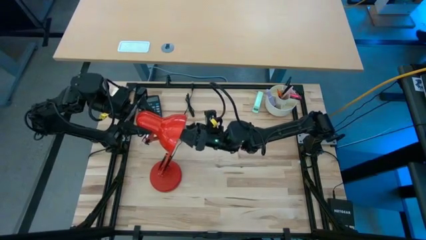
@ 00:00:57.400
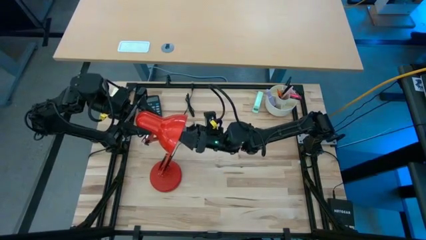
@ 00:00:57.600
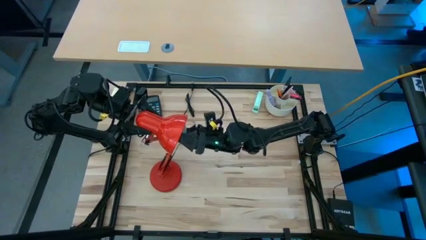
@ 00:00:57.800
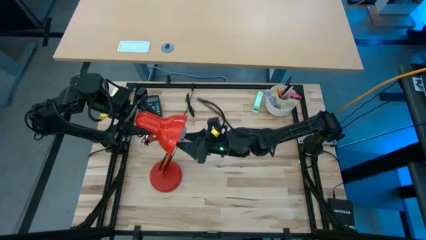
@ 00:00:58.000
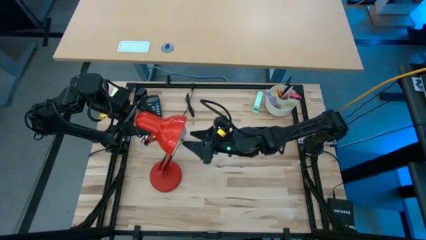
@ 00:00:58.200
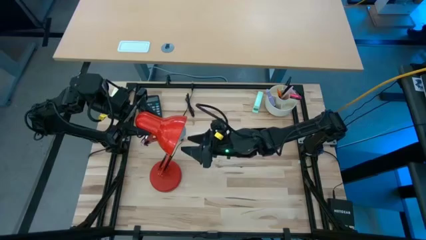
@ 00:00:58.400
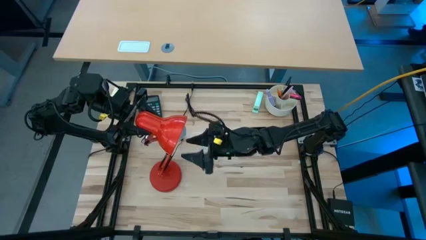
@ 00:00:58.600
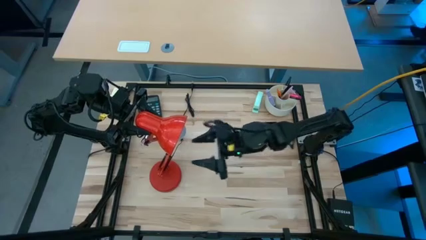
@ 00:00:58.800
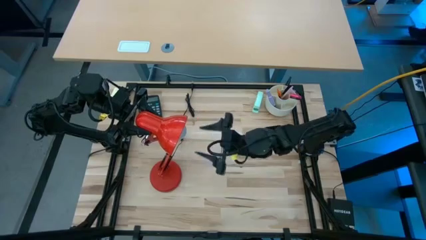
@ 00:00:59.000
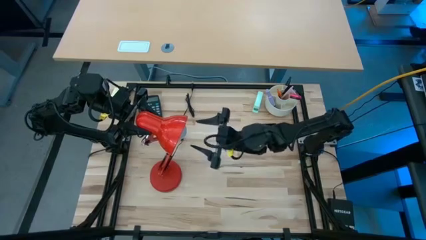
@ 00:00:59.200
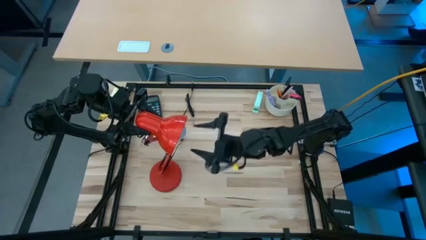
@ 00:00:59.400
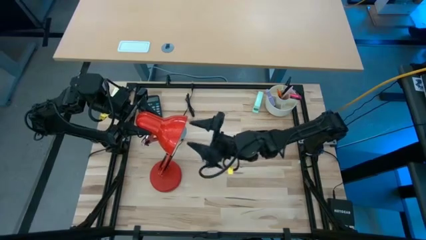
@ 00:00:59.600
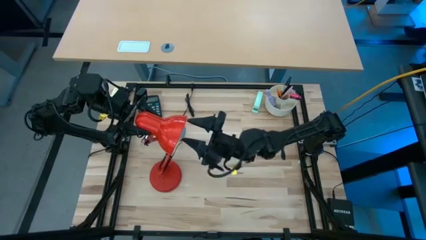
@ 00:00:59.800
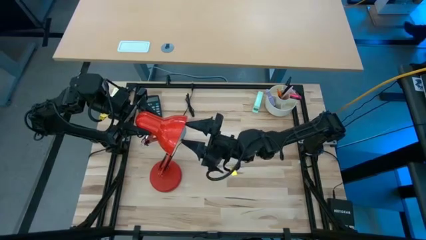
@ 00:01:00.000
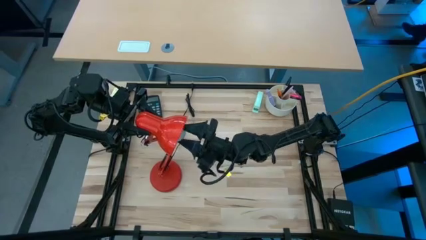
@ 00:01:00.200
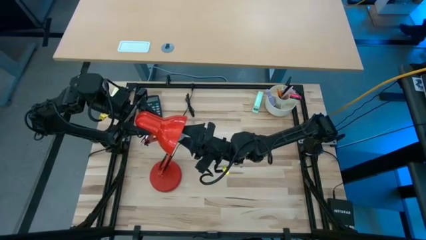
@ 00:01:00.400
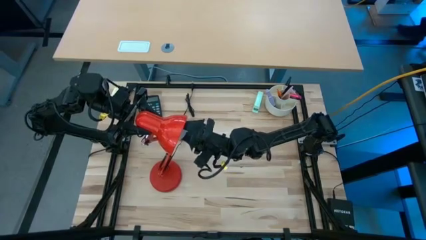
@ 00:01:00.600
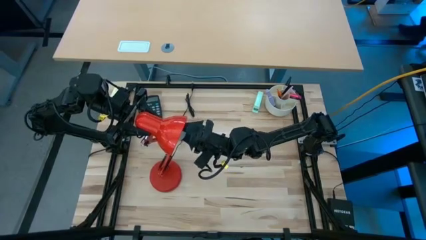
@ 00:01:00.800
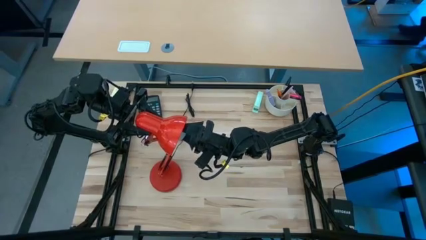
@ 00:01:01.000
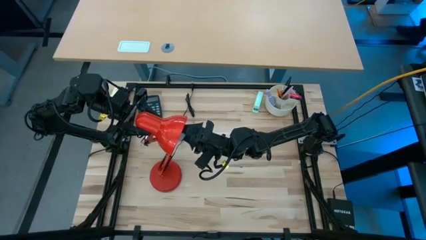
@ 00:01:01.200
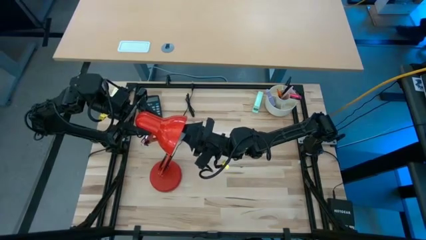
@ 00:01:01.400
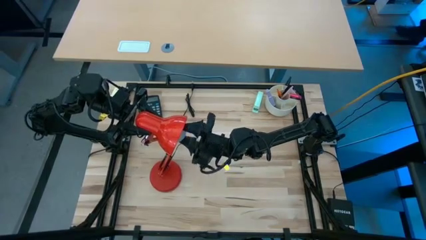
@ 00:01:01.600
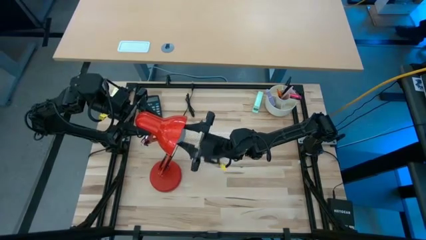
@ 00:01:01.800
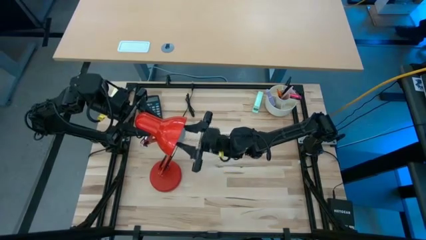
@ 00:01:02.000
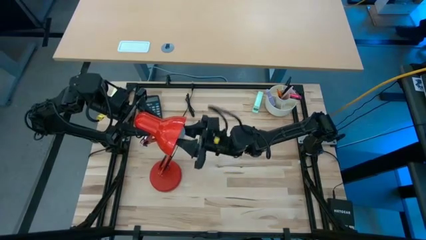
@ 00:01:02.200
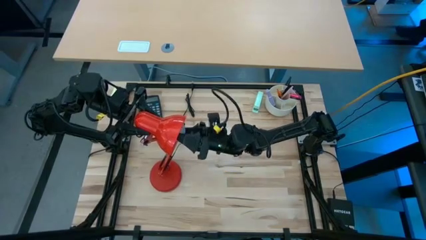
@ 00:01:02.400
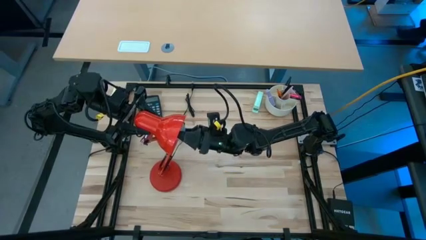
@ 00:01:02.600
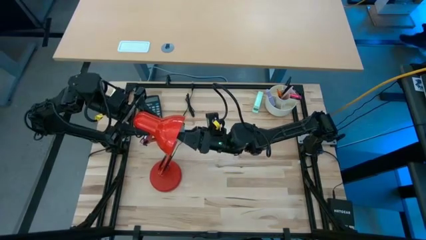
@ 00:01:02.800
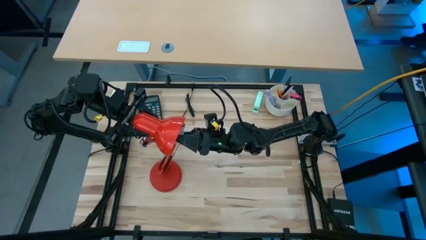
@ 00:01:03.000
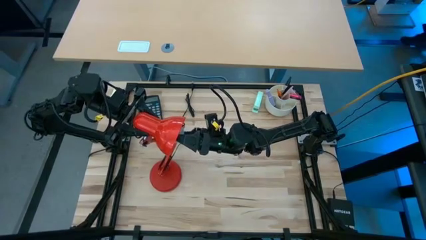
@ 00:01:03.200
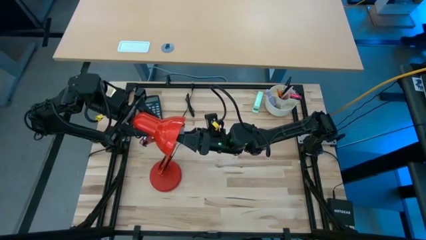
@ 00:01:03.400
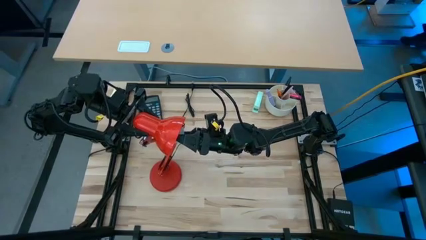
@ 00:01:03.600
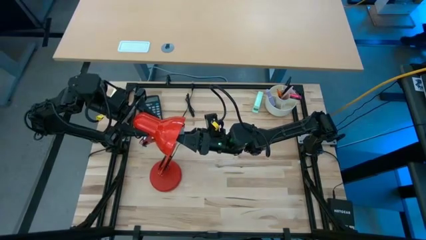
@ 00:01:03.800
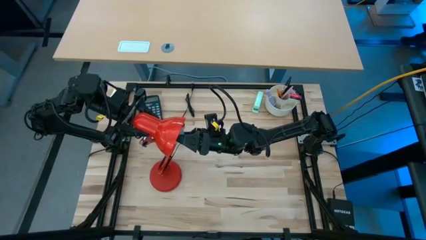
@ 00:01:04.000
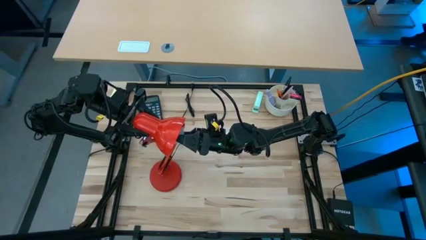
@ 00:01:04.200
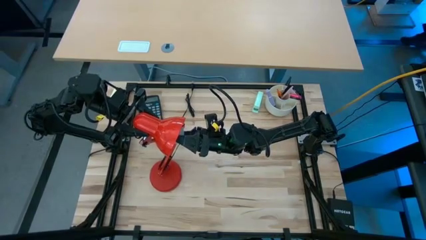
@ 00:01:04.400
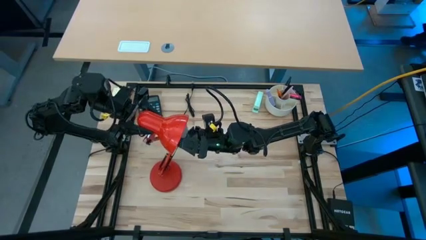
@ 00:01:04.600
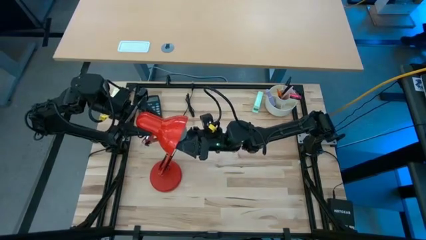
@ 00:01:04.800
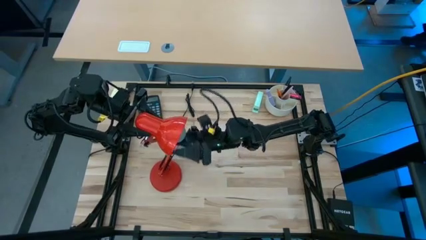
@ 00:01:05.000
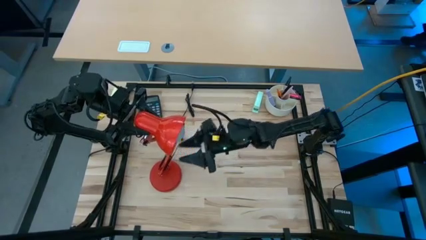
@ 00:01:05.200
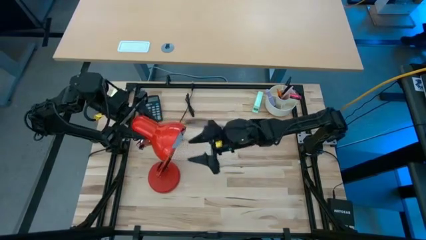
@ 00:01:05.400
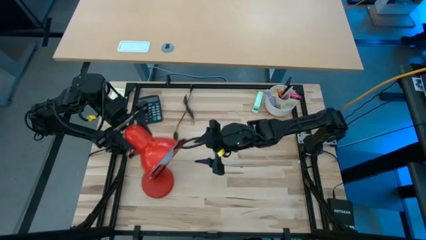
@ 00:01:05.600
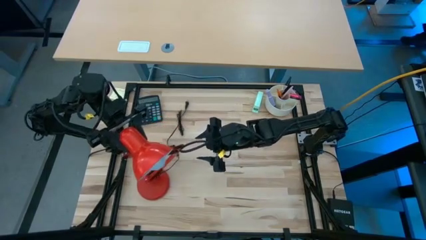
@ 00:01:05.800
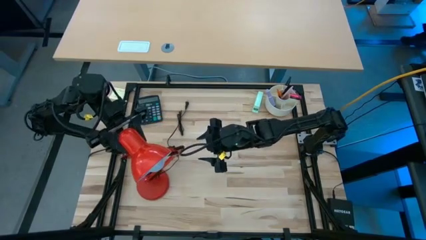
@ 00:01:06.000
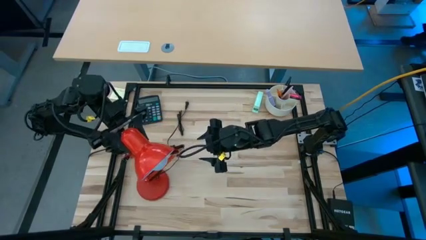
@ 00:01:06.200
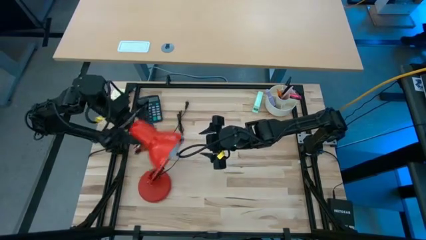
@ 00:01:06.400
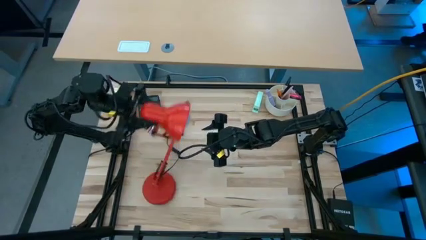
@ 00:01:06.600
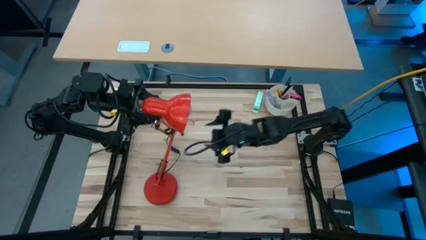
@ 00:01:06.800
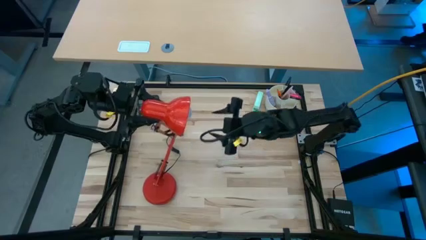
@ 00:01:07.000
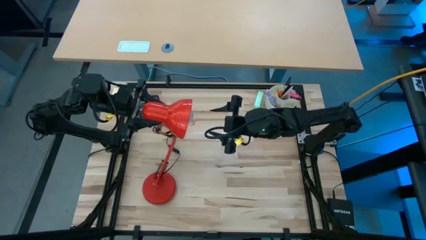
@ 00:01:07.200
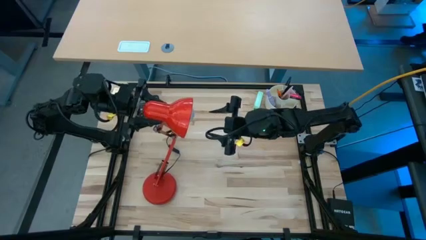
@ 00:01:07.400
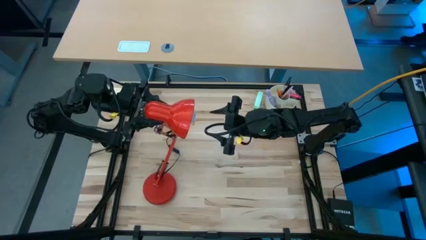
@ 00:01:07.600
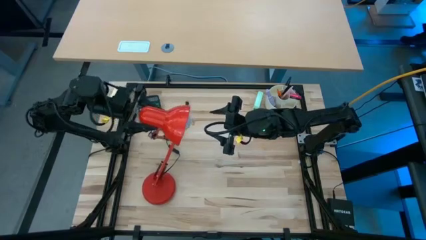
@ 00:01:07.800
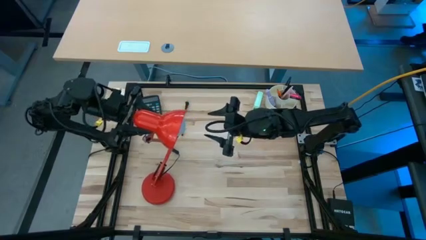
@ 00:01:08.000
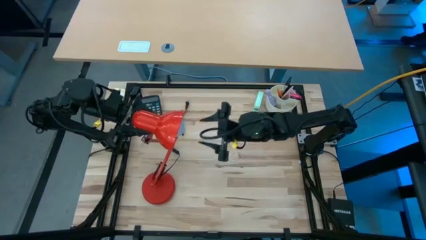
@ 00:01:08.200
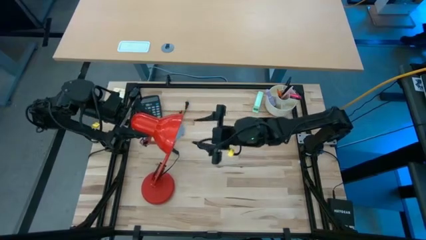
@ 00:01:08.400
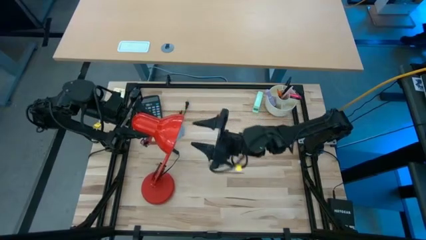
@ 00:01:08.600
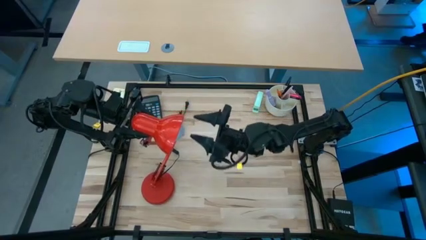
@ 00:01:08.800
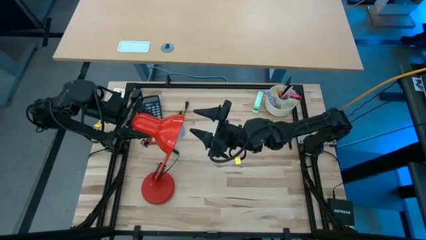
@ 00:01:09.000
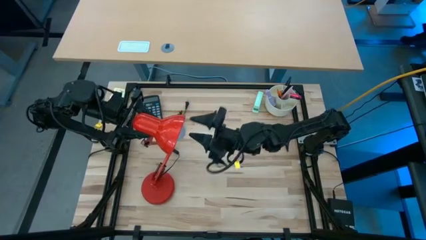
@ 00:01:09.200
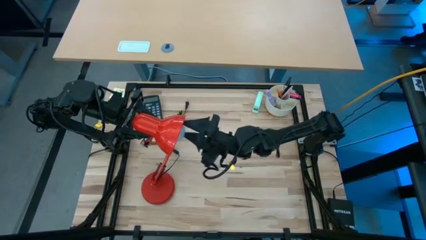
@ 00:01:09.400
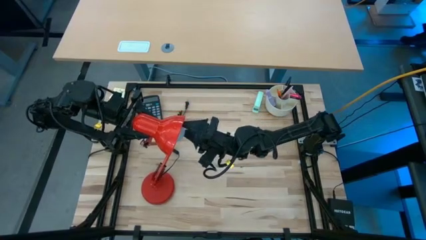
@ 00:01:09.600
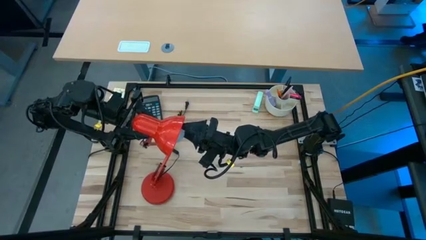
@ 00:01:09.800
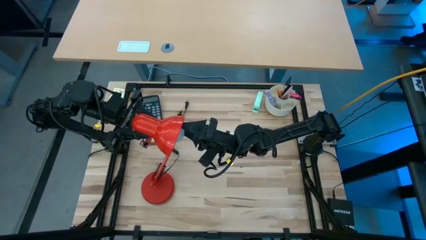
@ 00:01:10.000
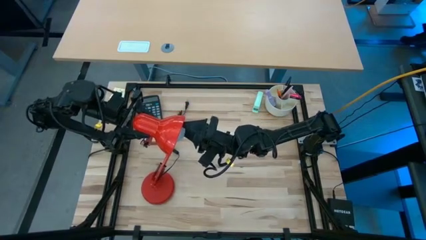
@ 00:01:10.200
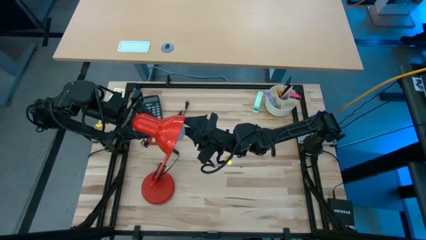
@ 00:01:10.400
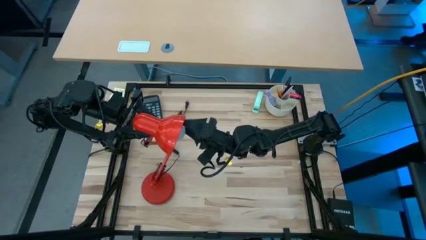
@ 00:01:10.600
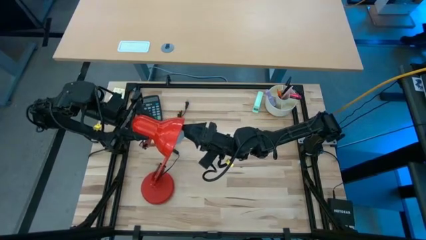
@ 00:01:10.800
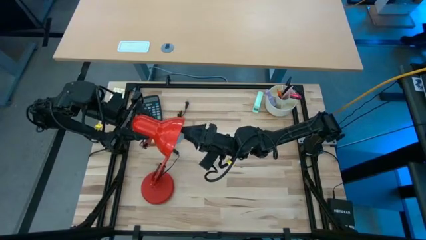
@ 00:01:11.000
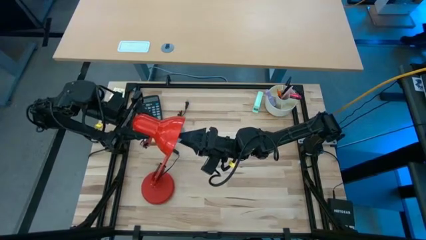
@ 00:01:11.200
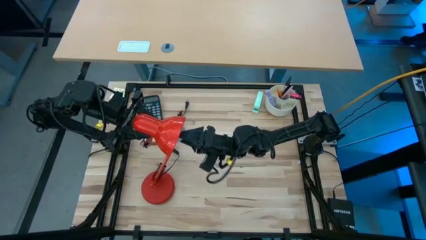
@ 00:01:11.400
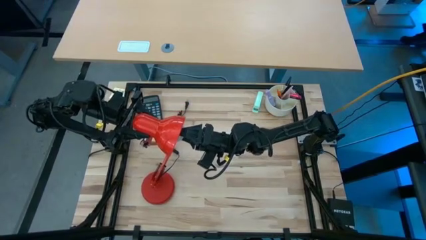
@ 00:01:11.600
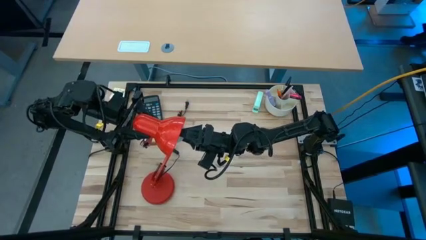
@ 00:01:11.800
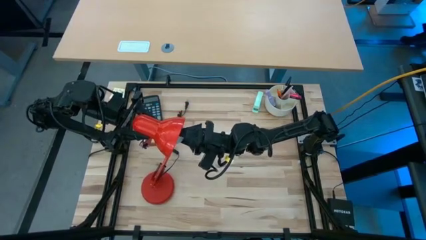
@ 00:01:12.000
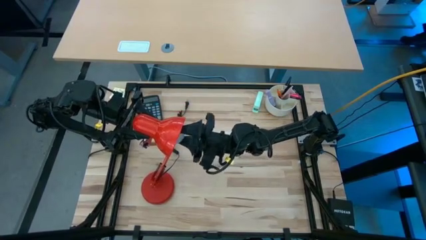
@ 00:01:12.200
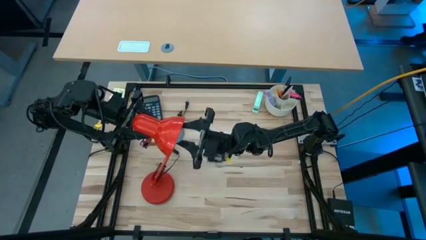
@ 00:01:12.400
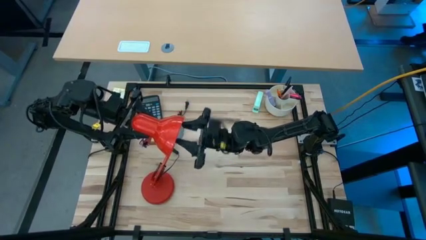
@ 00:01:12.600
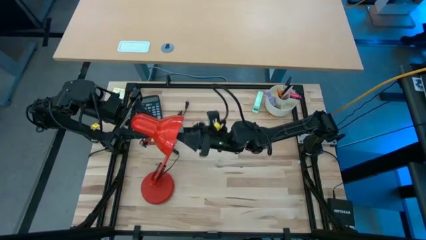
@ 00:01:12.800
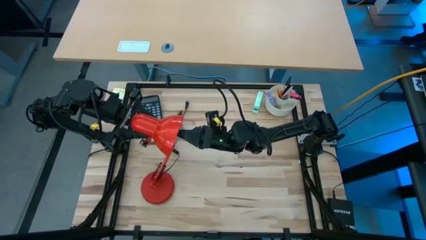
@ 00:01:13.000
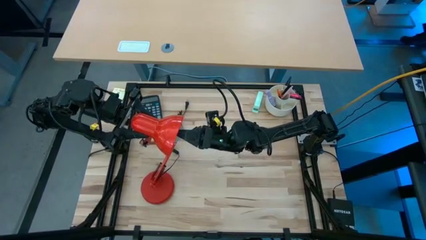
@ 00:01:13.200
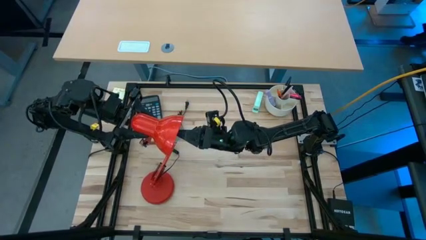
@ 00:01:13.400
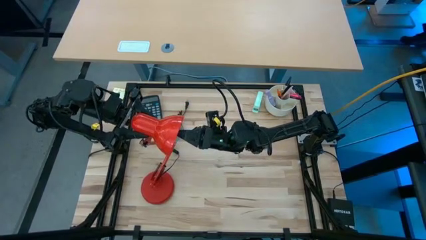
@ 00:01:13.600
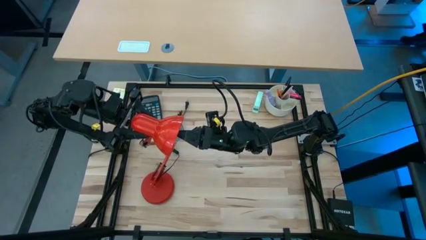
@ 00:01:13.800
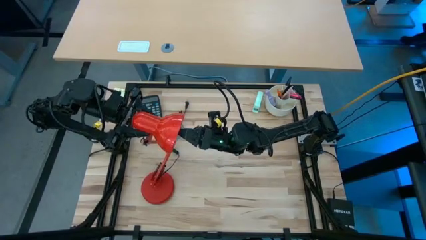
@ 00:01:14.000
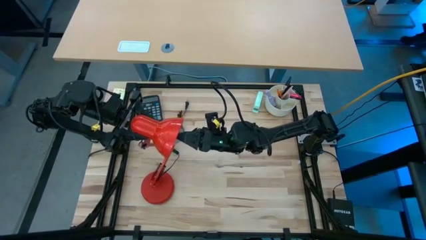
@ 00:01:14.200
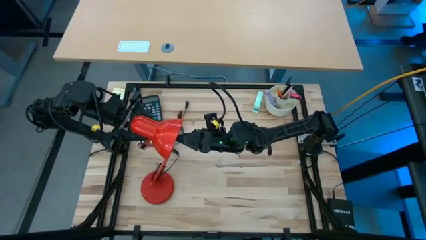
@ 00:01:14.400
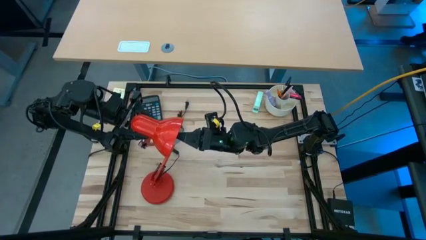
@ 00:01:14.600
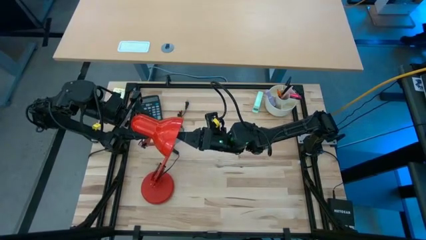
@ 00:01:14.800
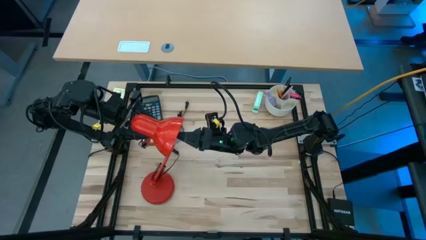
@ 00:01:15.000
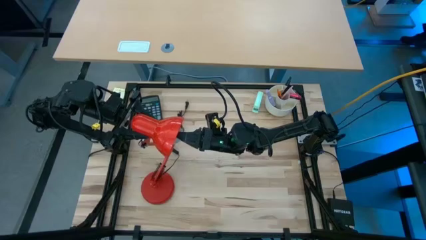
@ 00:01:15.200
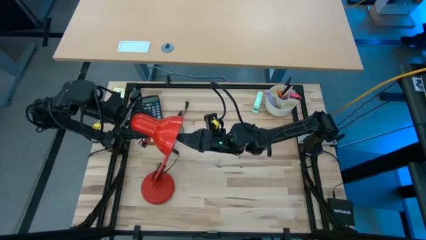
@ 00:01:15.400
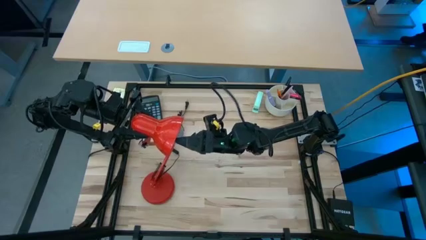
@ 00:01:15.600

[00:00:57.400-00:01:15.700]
Task: Screw lightbulb
Insert the white lightbulb into the red desk lamp
